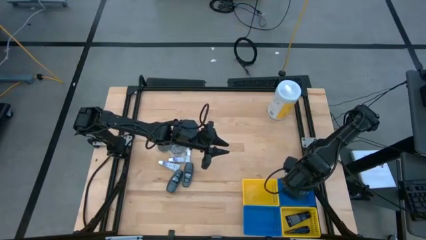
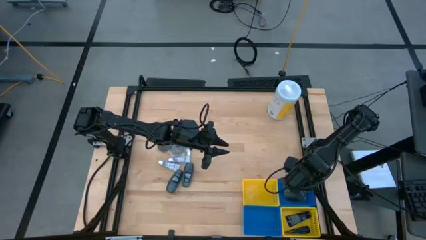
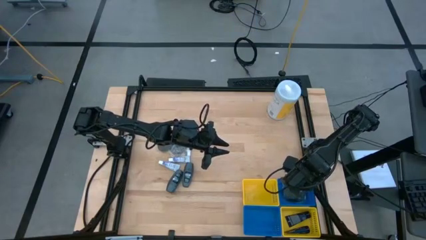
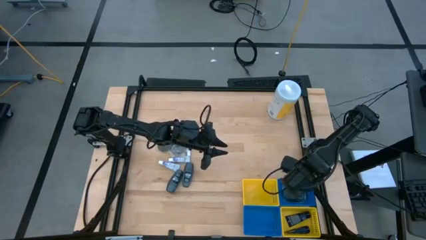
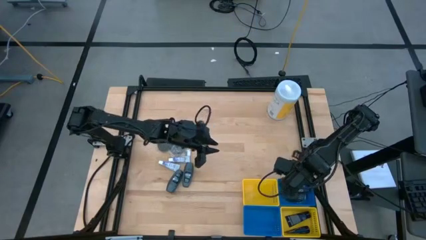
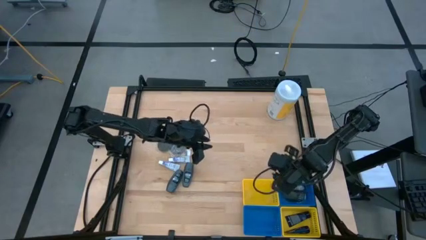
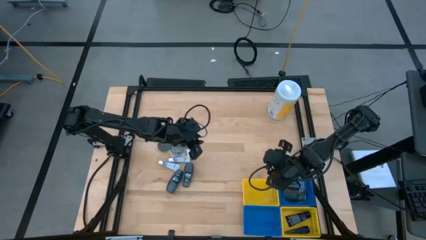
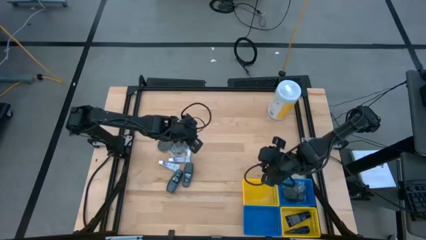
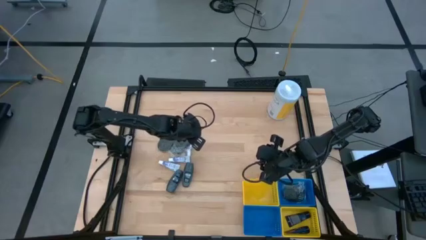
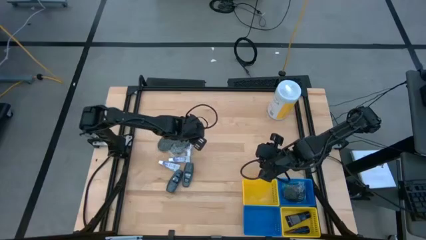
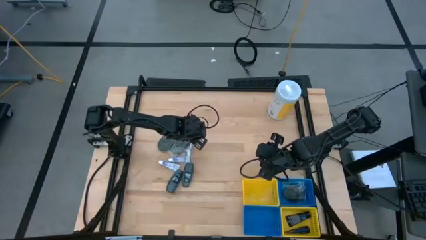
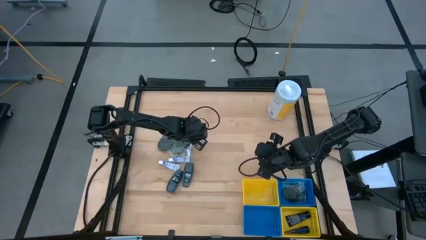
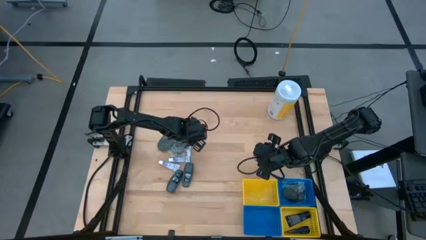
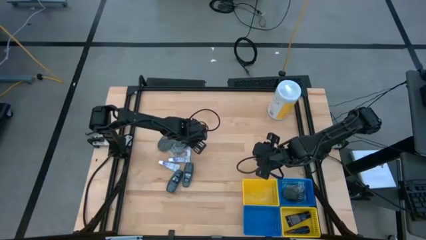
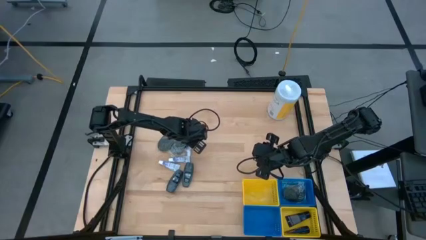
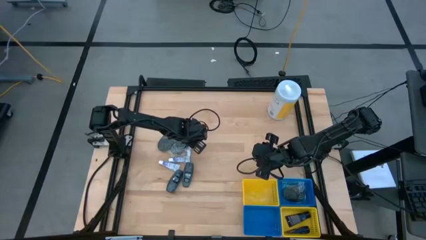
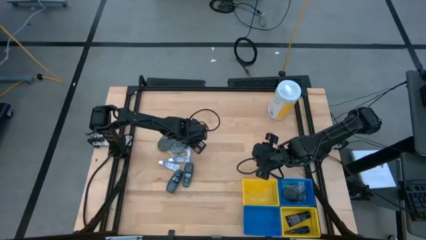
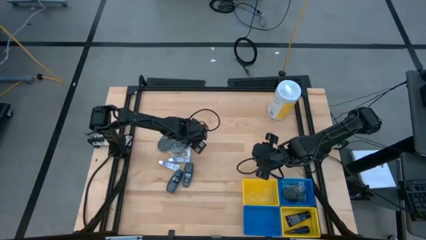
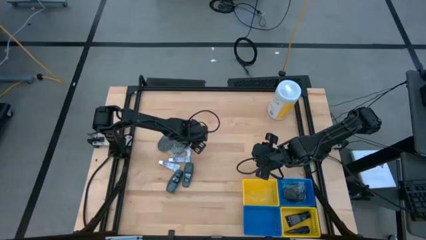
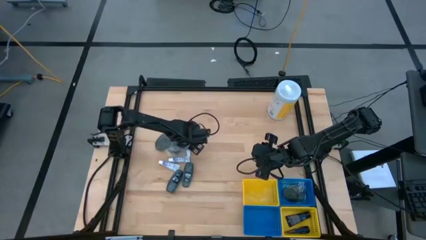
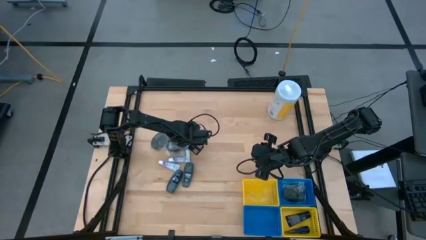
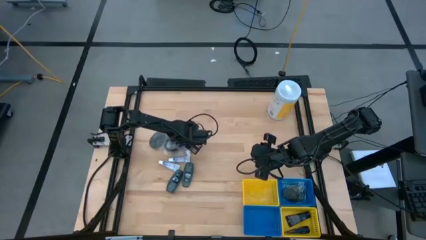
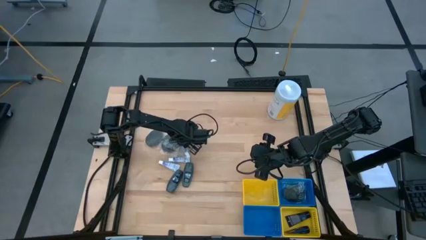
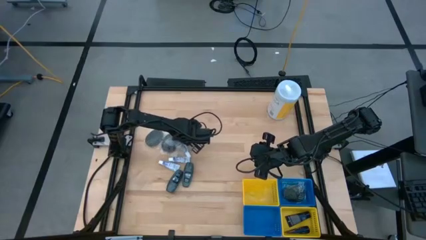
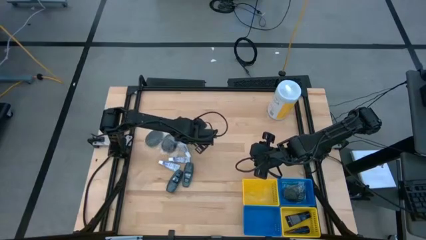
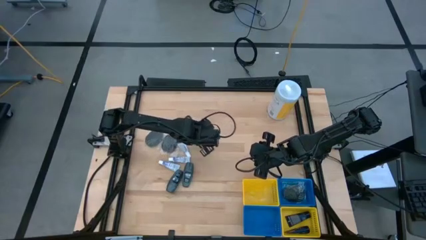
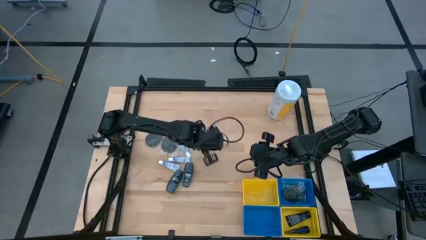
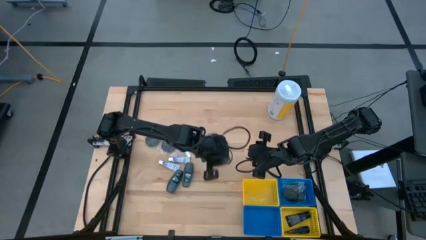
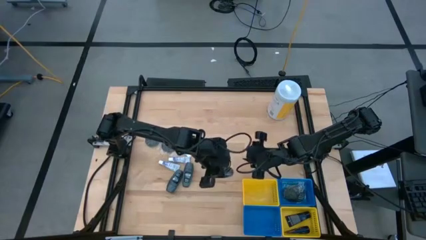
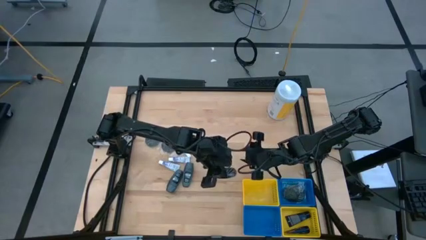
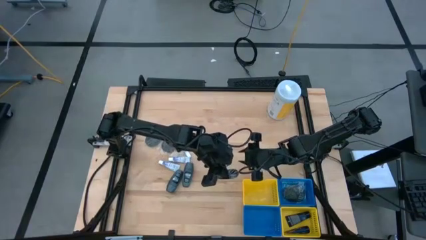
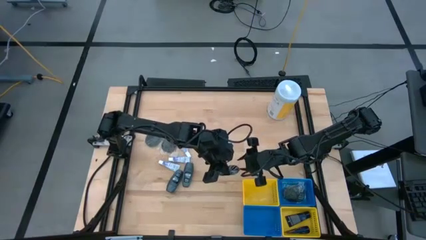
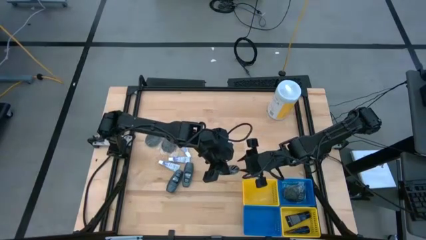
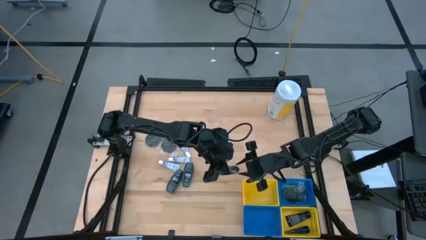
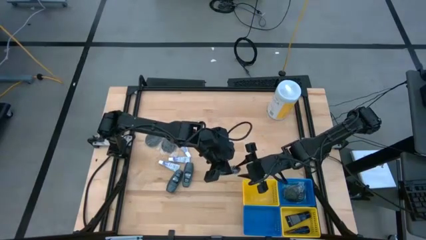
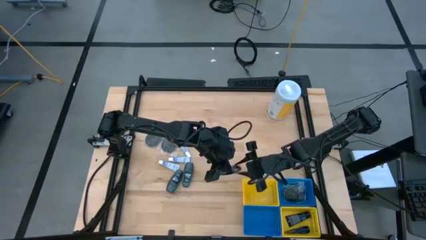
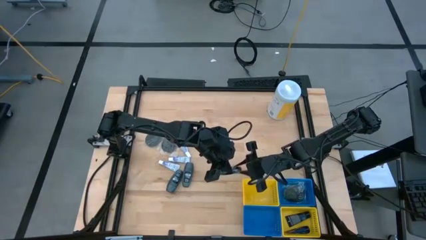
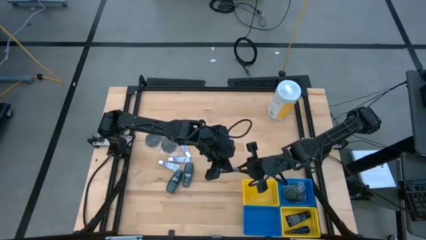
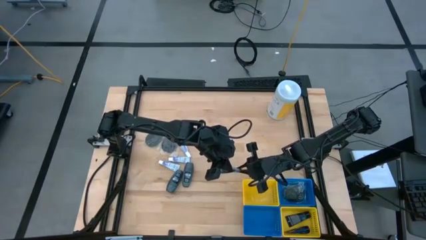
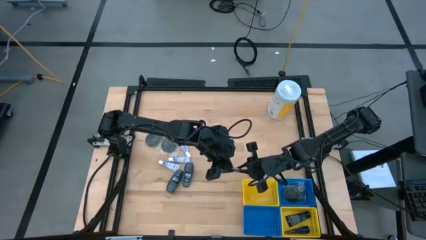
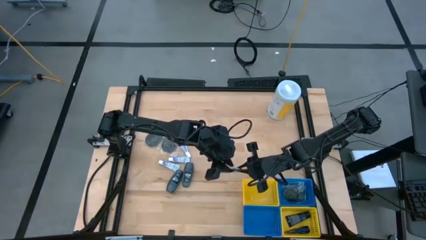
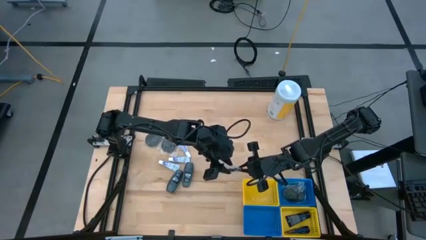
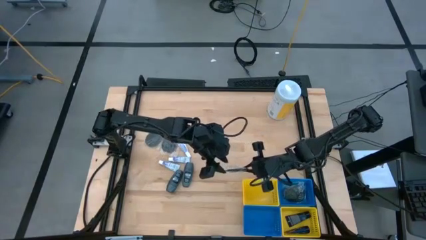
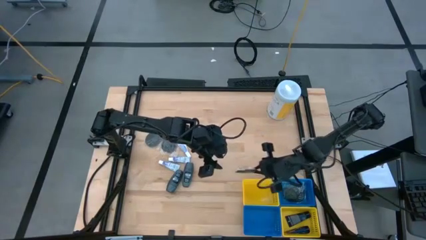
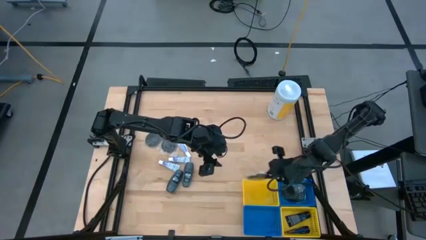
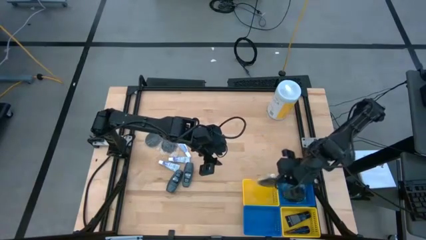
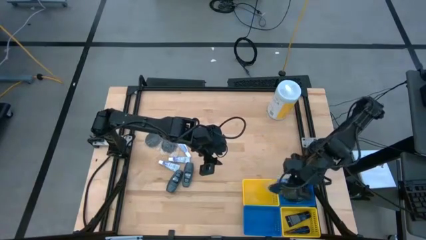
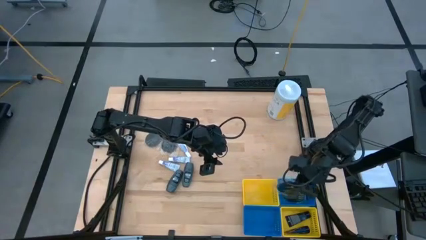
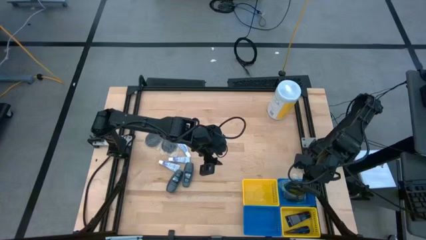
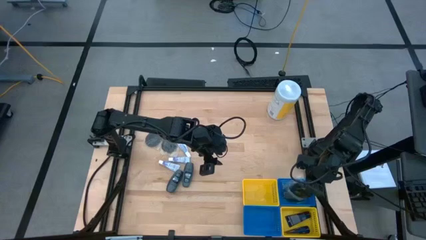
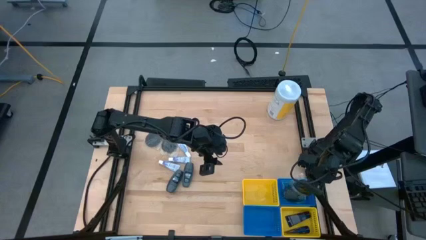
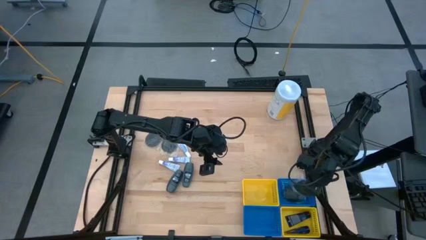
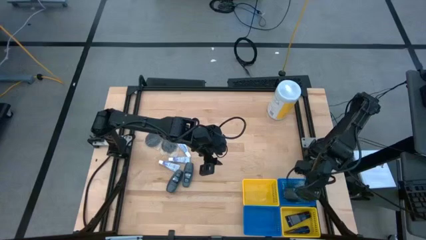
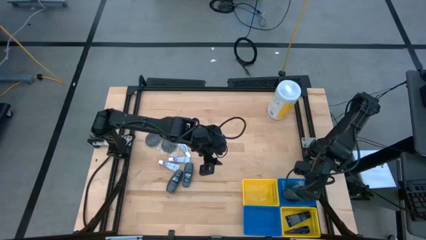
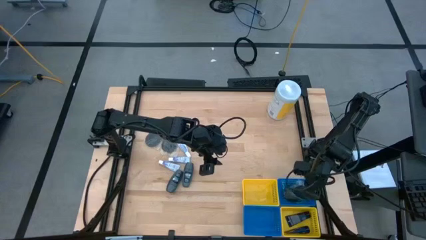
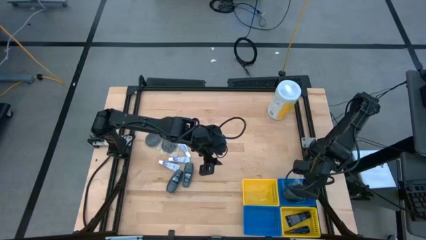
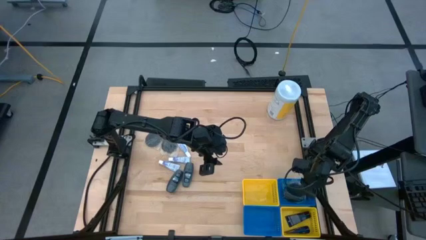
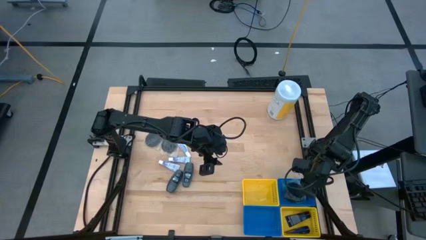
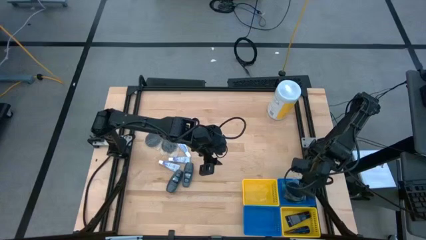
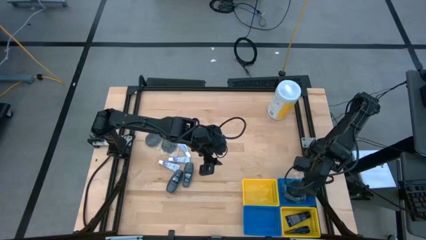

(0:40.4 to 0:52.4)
Task: Pick & Place Travel size toiletries
Put the black hairbrush into the top blue bin

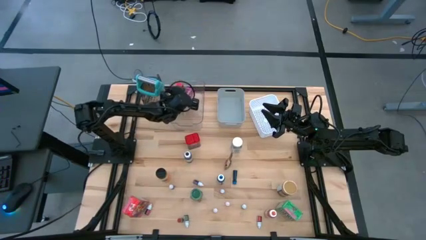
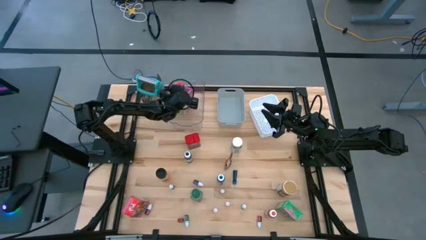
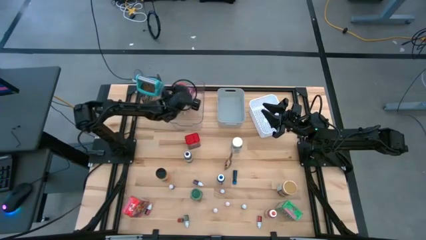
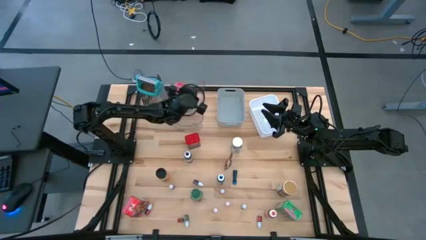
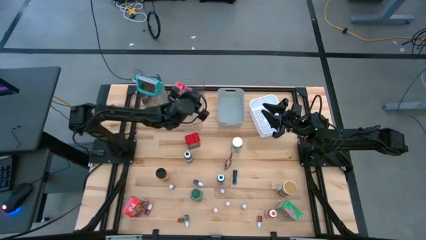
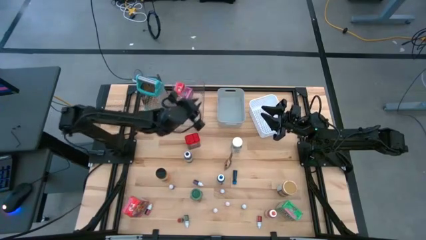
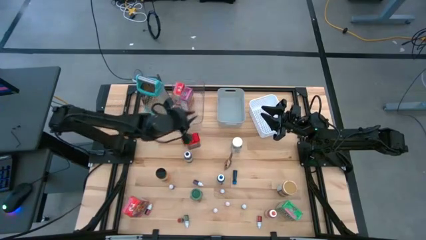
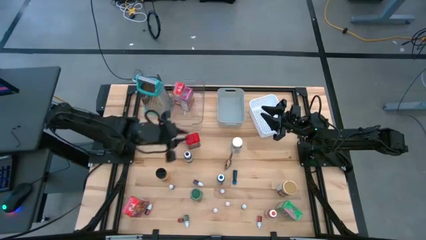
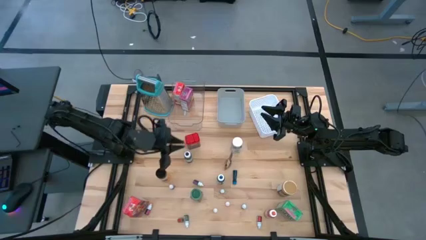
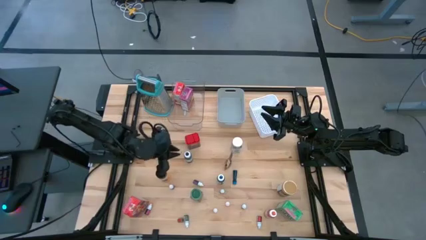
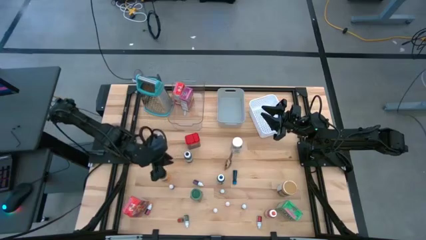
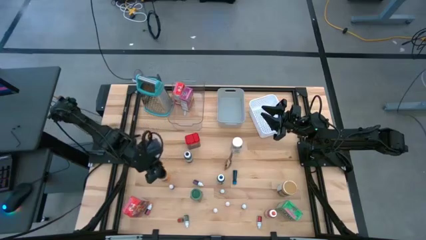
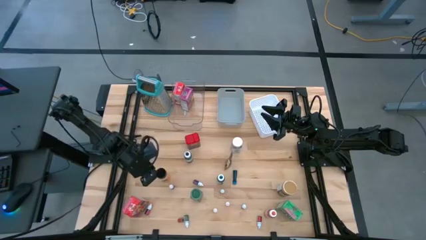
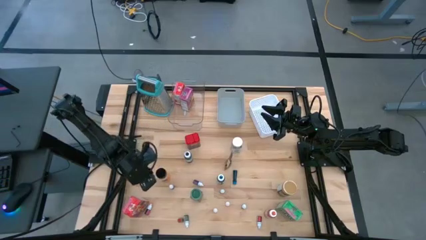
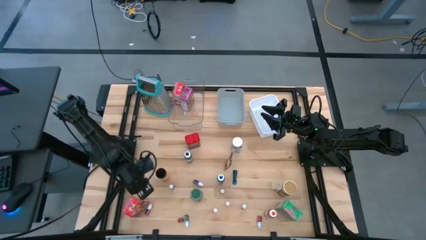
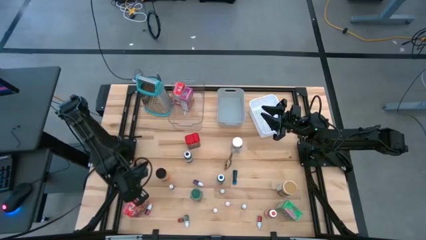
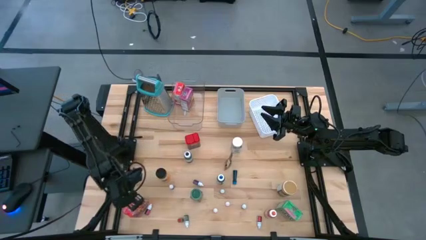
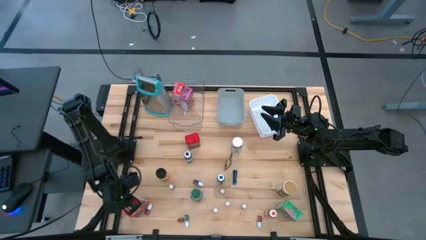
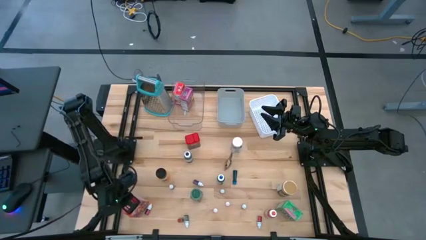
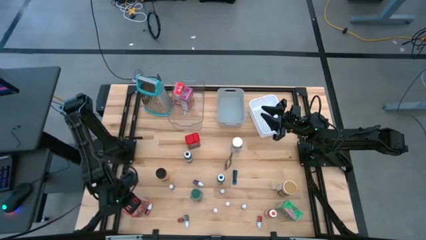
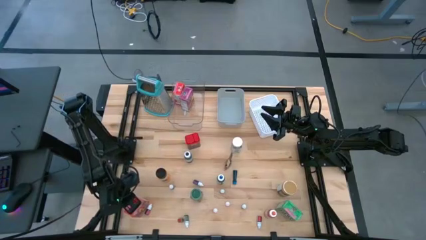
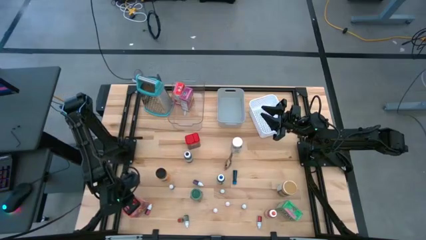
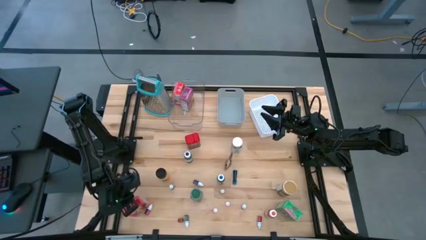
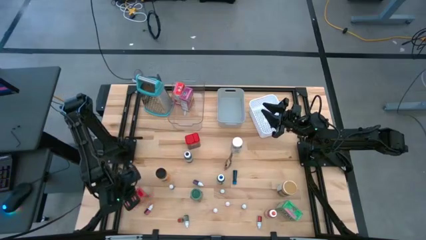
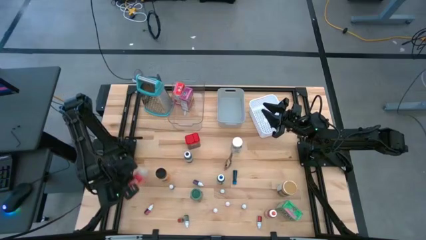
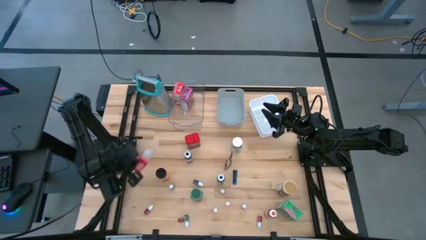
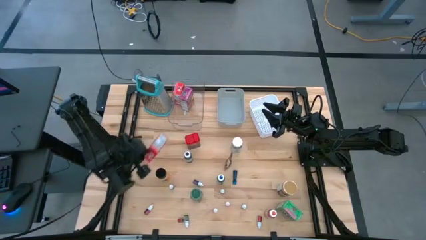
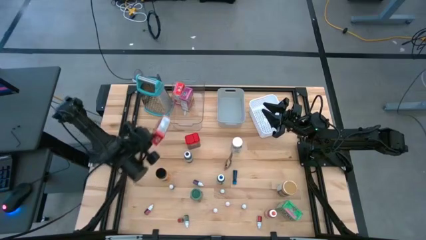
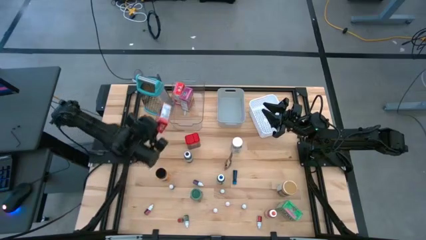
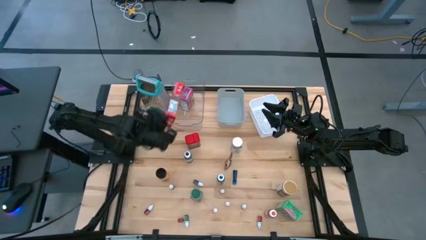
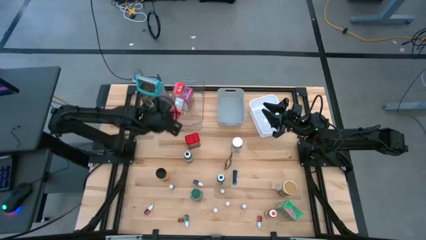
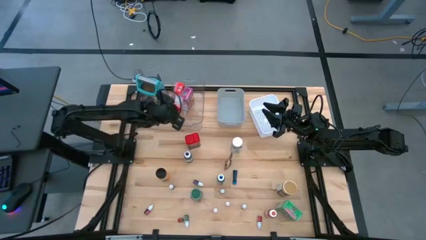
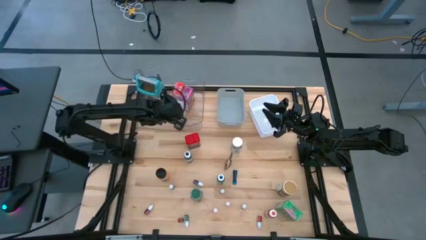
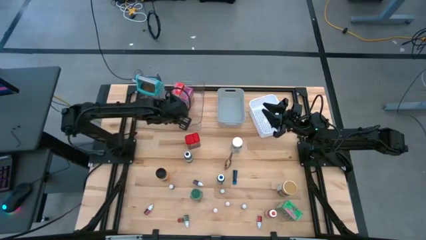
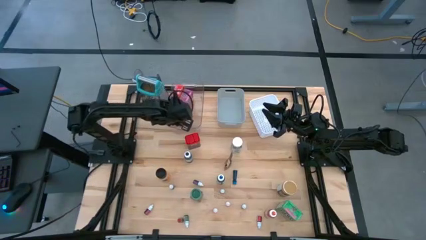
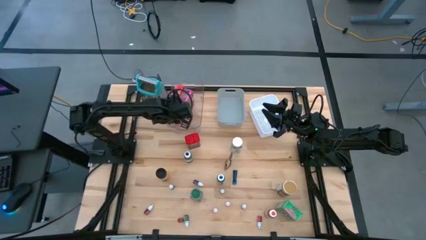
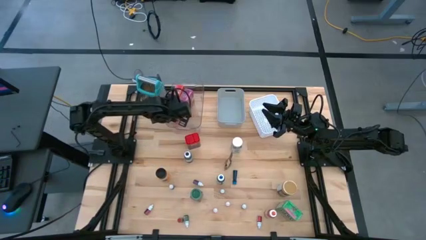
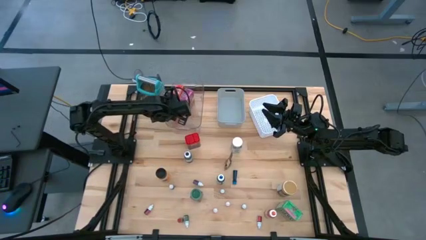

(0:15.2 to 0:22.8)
Task: Pick & Place Kitchen Items
Put the red cereal box into the transparent bin
